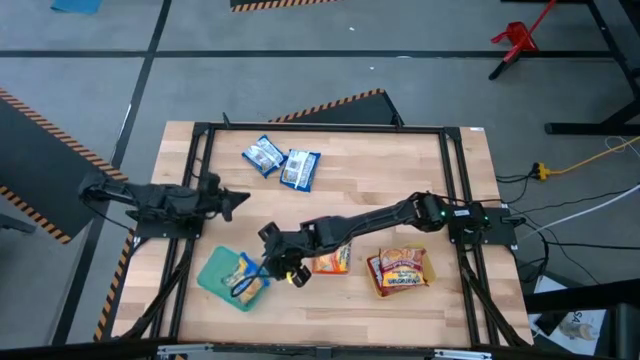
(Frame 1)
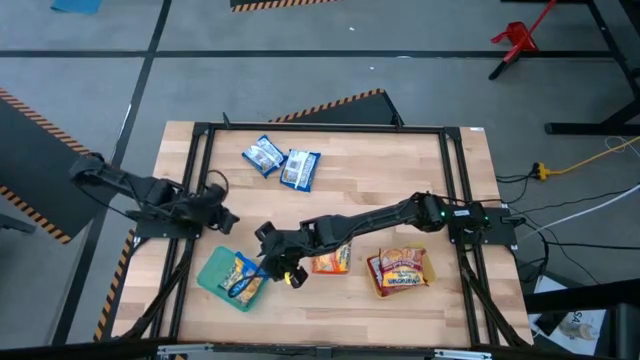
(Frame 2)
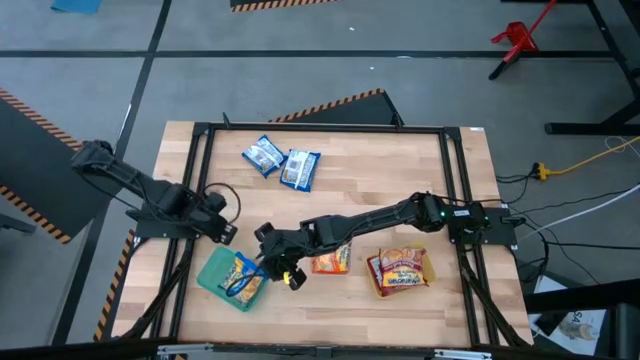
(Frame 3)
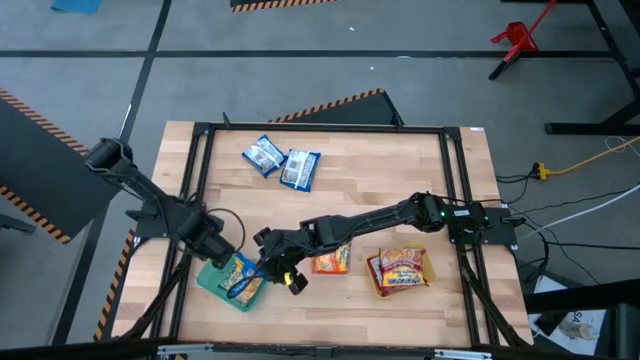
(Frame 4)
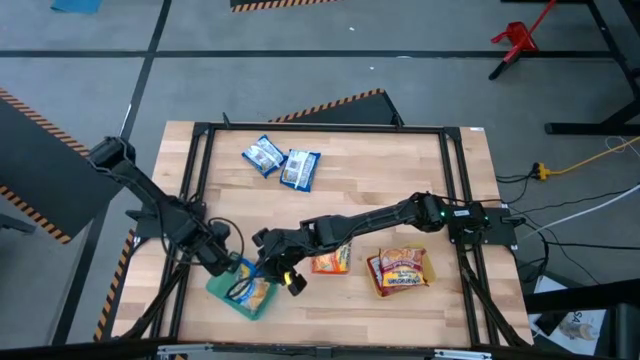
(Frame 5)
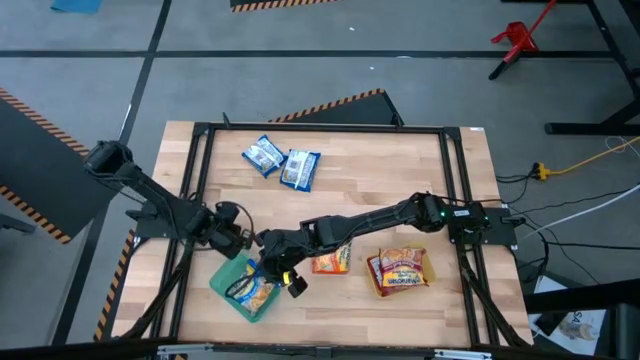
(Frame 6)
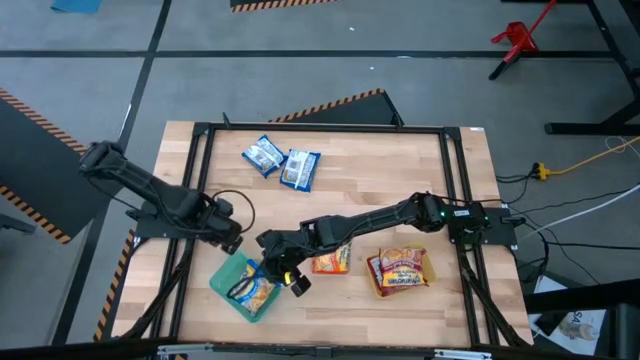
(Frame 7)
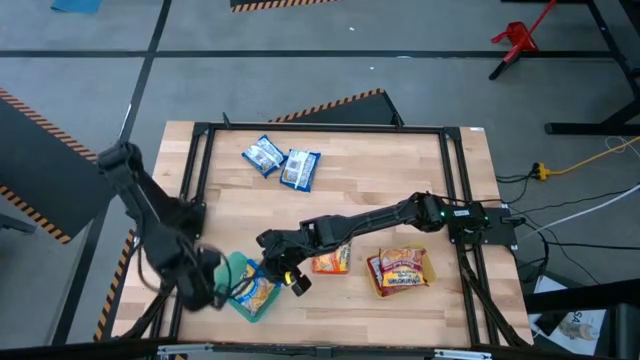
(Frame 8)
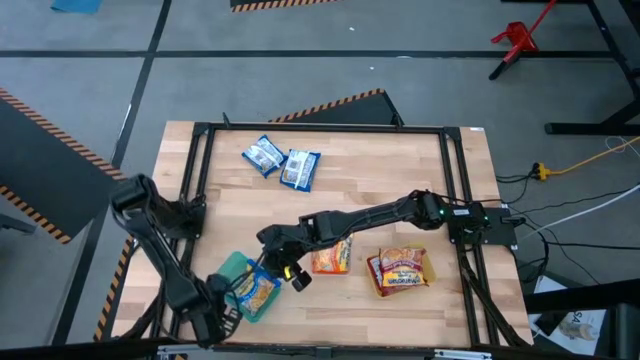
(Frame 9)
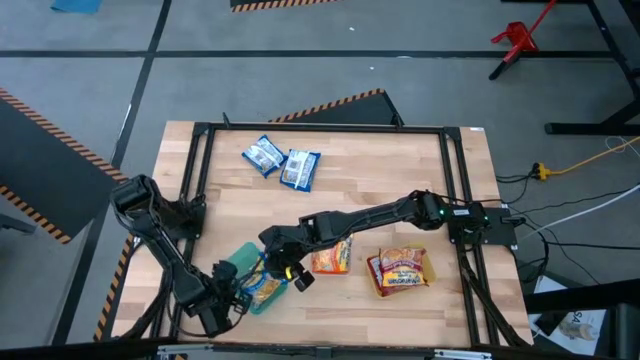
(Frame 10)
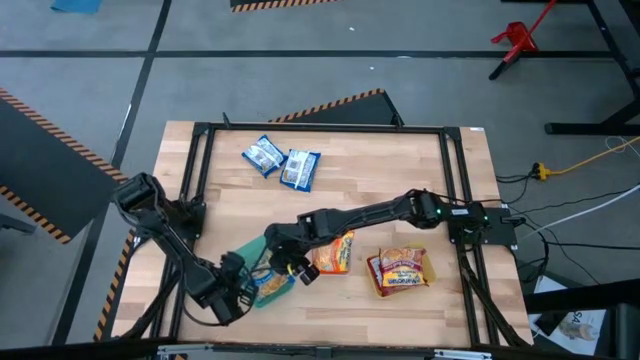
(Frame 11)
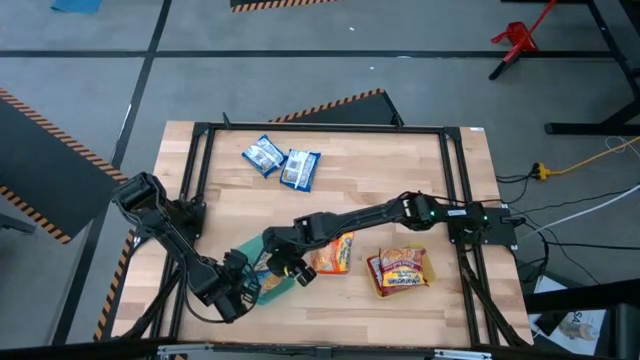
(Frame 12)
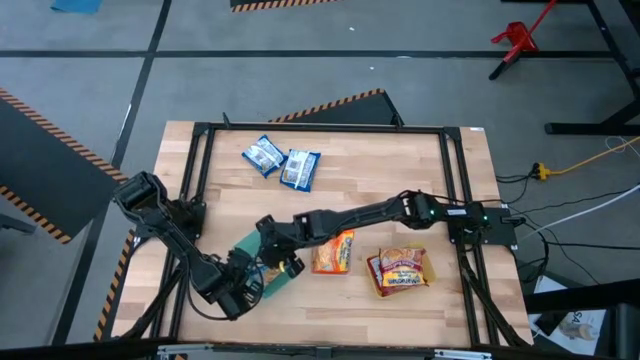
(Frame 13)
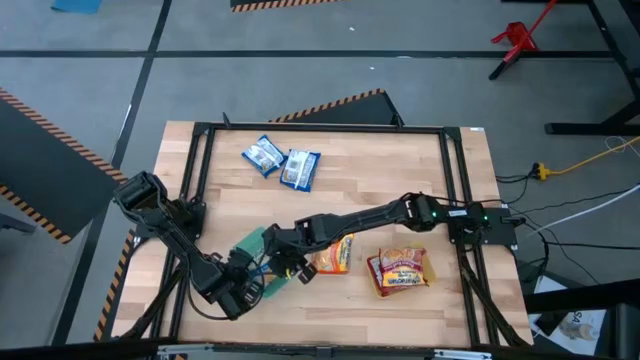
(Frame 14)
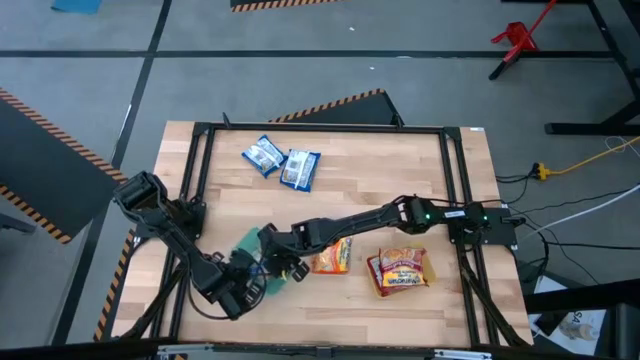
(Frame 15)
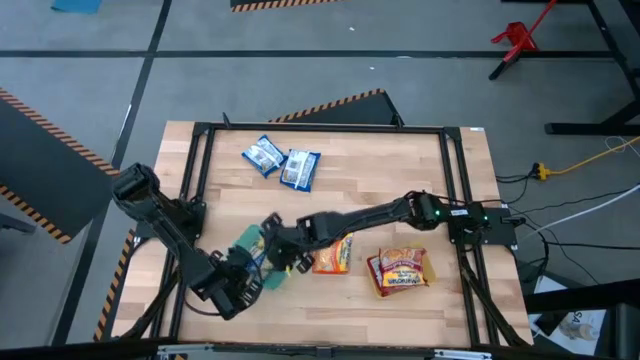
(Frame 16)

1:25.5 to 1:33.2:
Task: Sort Maruchan noodles
Adjust the green bin

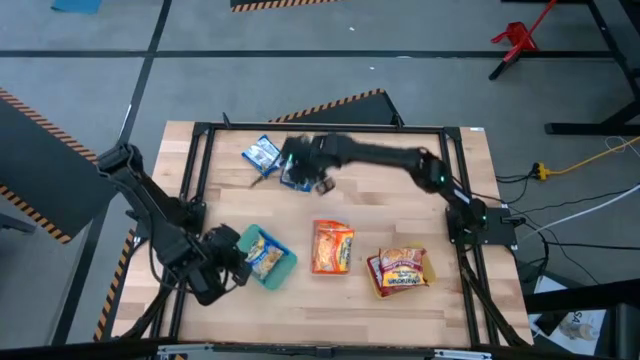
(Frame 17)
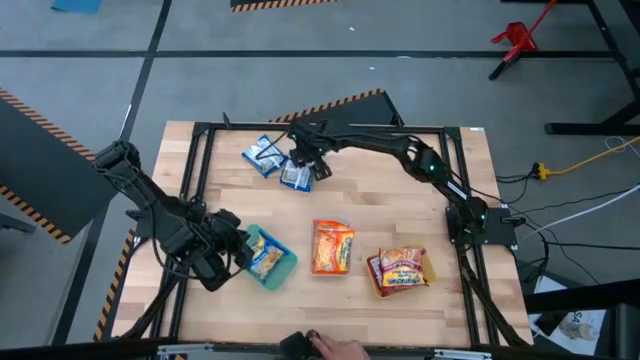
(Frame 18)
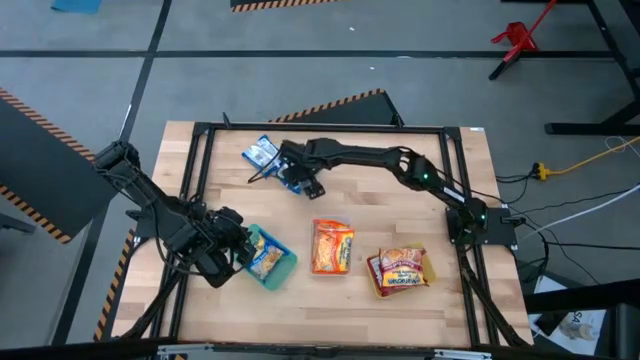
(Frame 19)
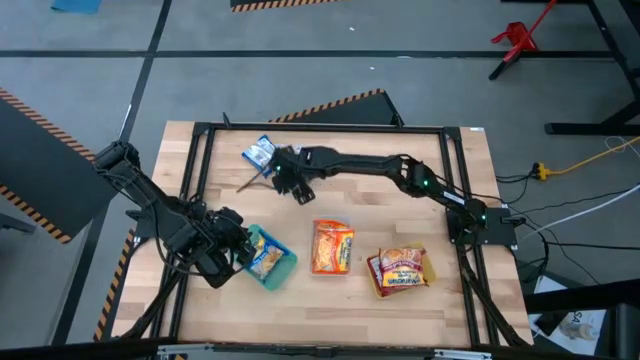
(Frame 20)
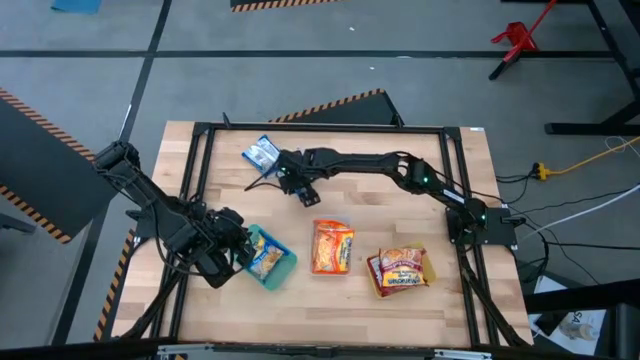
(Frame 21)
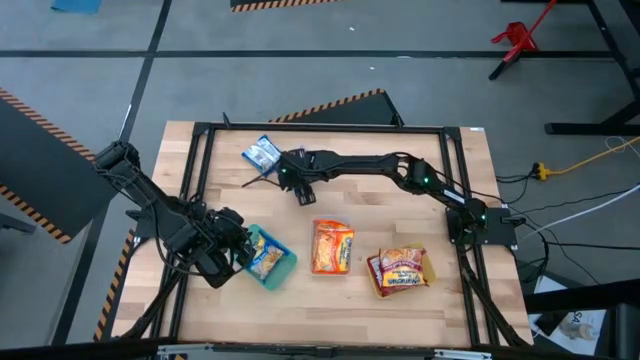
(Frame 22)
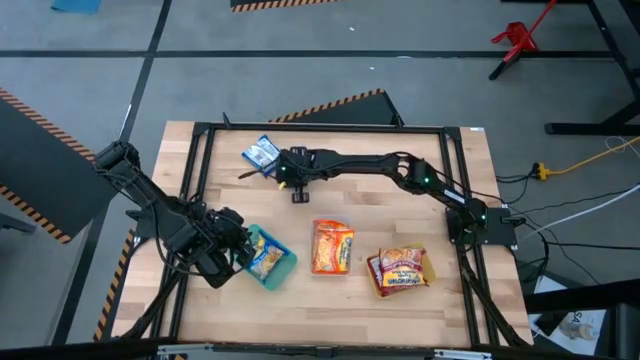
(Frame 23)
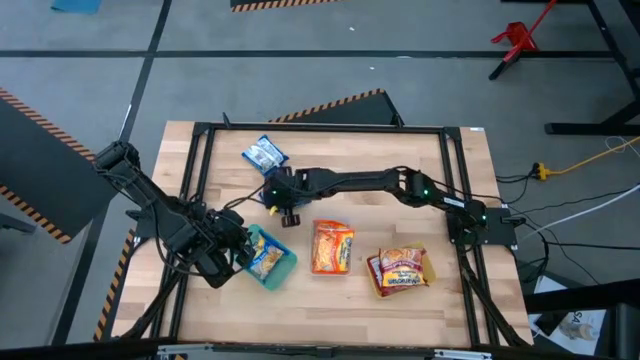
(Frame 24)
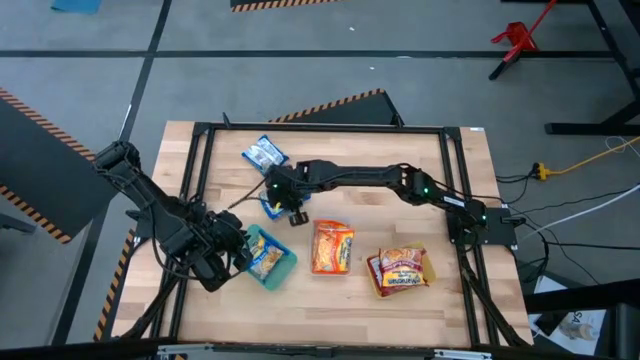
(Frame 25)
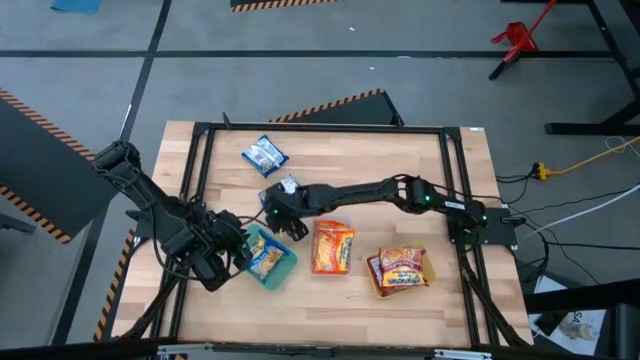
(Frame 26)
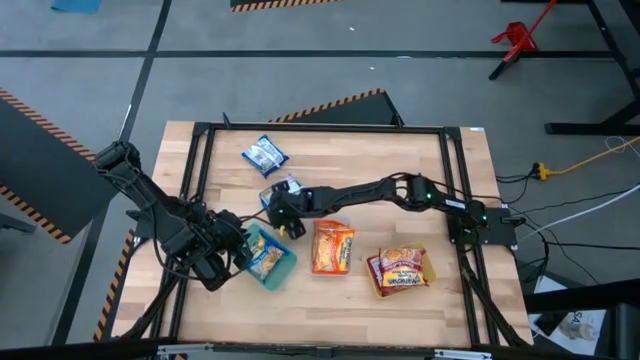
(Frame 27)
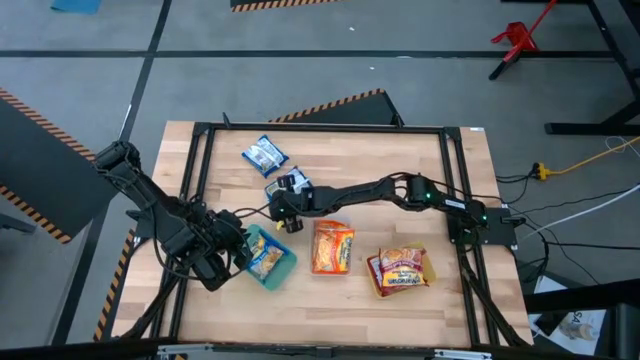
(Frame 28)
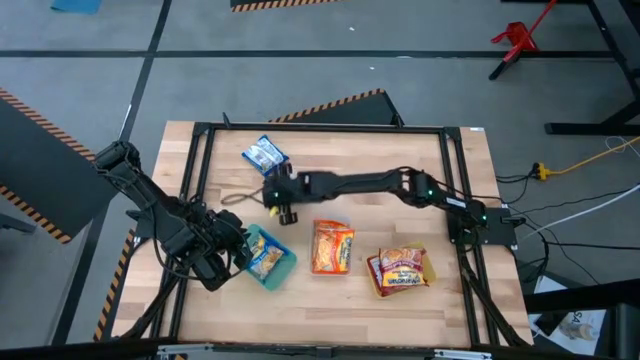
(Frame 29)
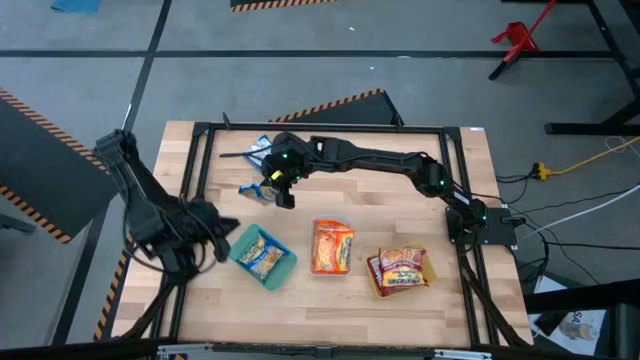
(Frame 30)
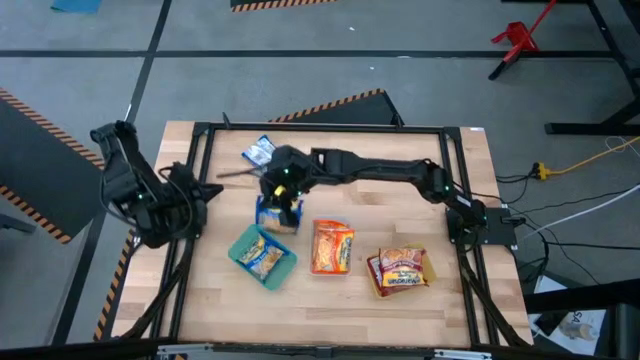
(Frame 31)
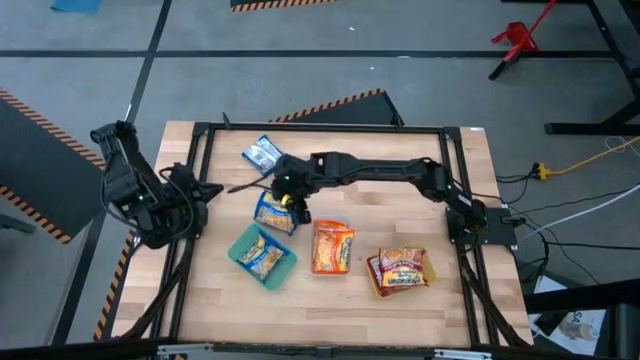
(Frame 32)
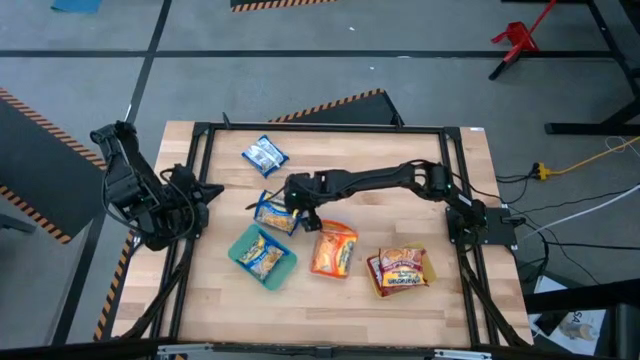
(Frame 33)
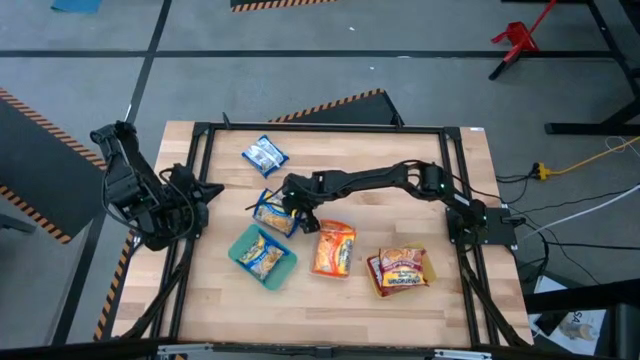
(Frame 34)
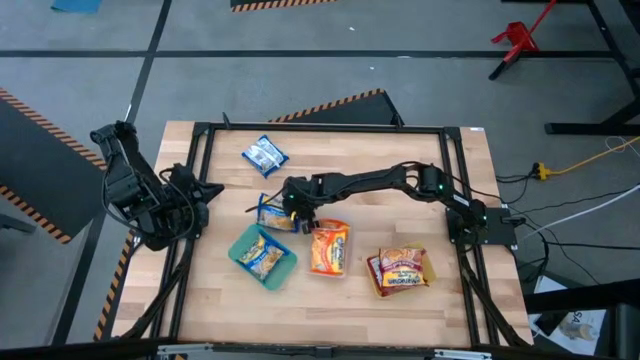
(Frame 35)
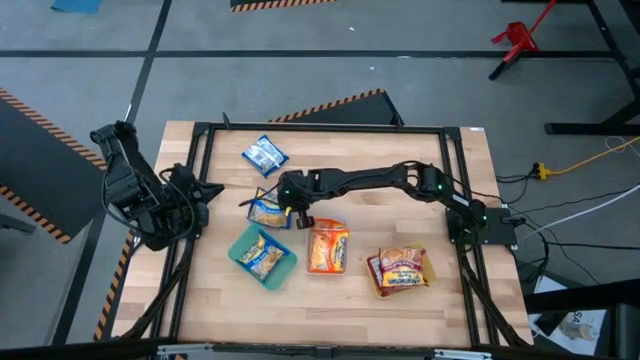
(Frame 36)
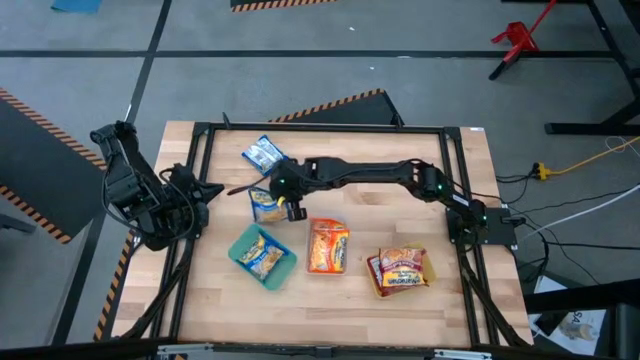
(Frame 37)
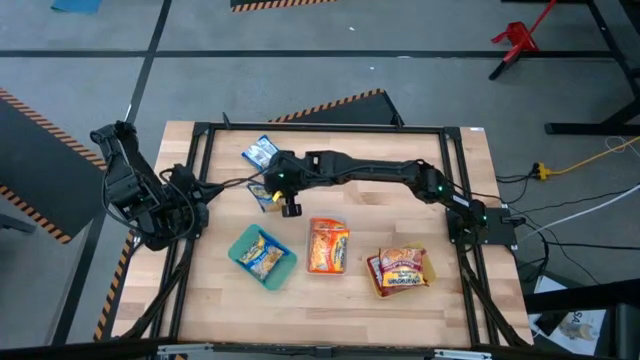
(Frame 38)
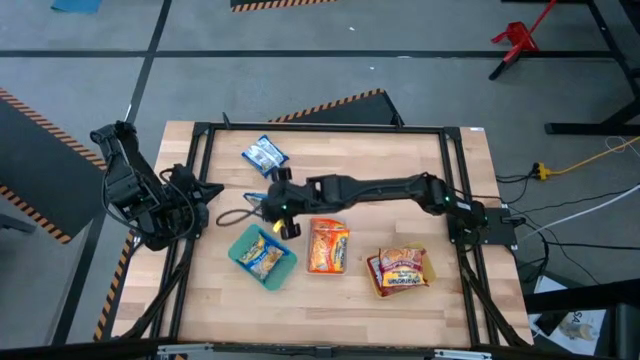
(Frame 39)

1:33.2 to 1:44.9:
Put the right blue noodle pack into the green bin

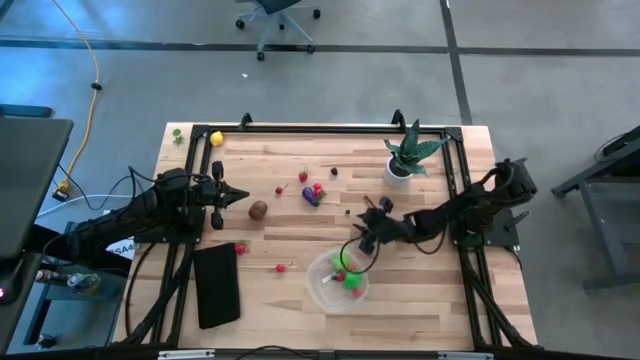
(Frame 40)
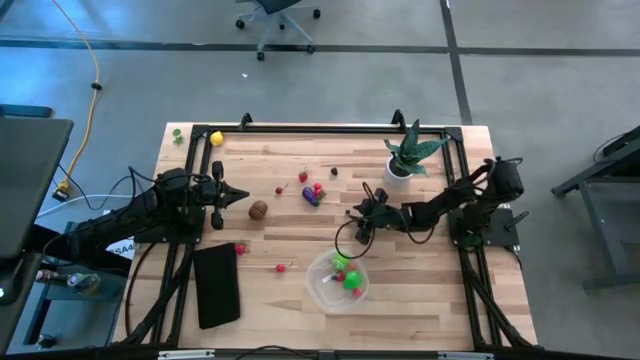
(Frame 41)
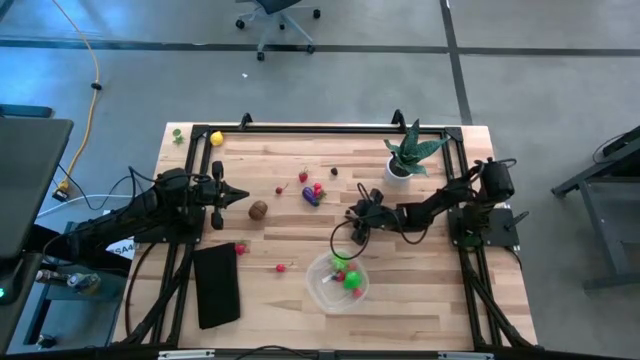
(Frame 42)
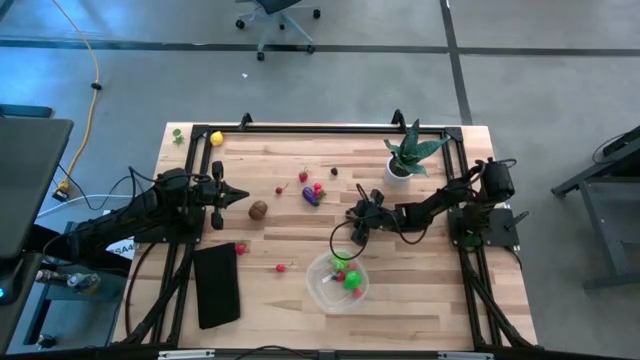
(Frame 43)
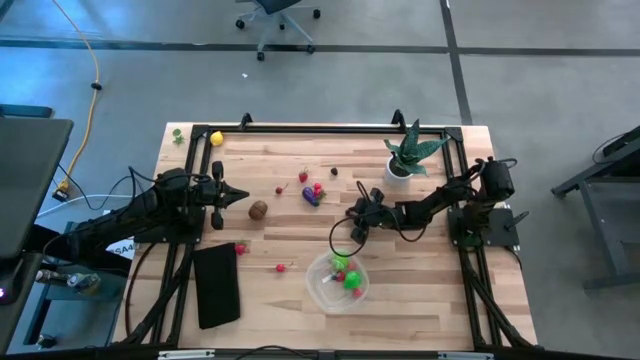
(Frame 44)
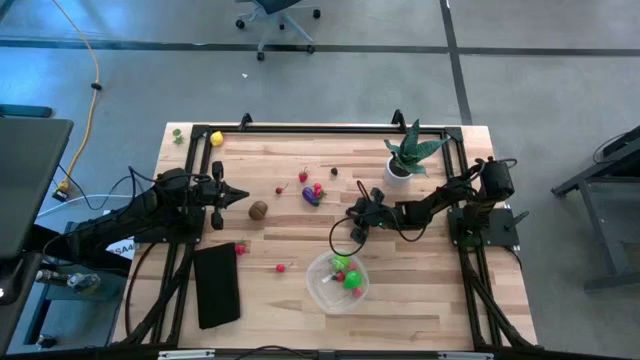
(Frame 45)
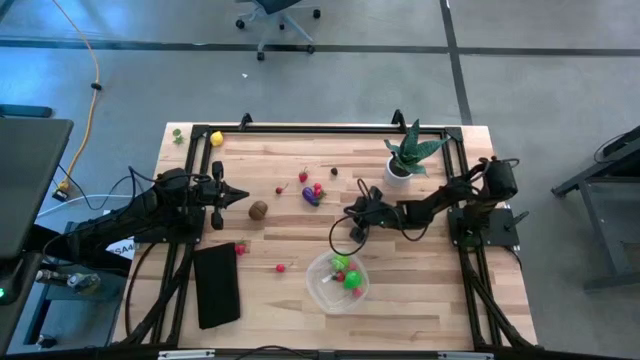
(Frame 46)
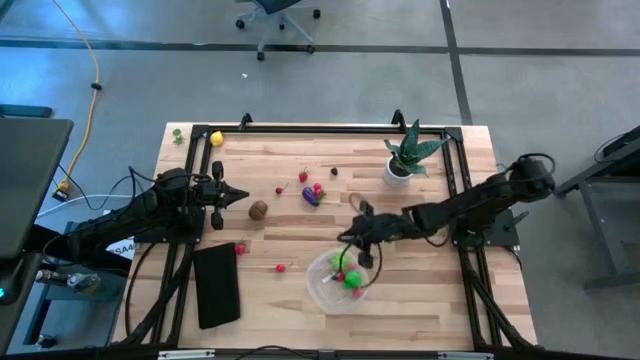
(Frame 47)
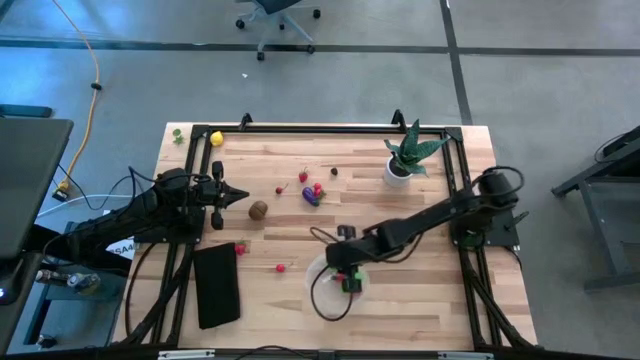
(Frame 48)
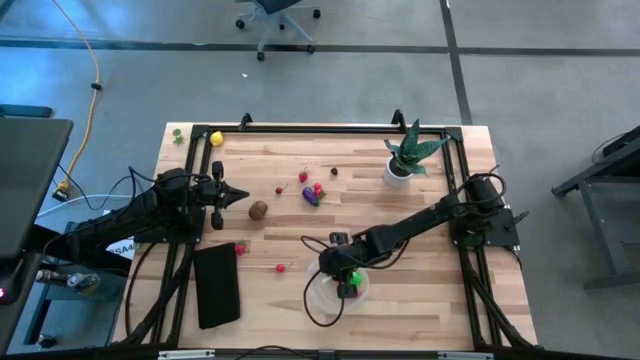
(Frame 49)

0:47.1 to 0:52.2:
Task: Pick and placing Produce into tupperware
Put the blueberry into the transparent container
